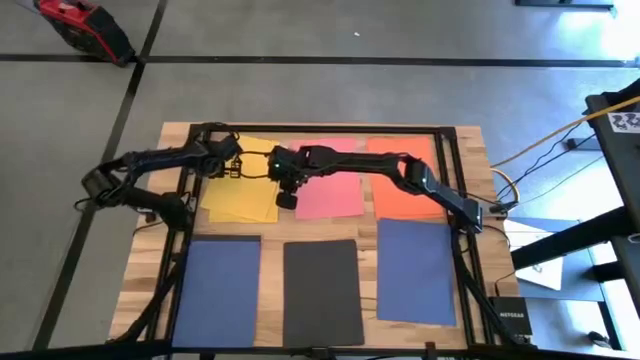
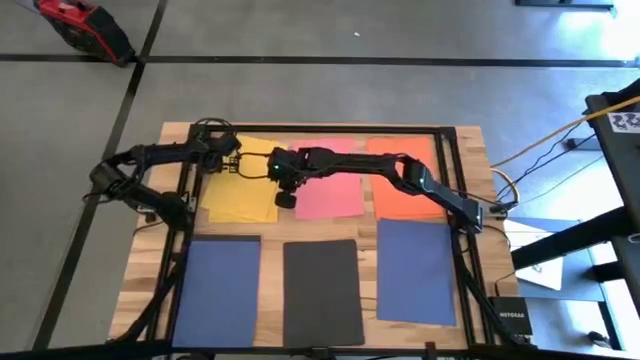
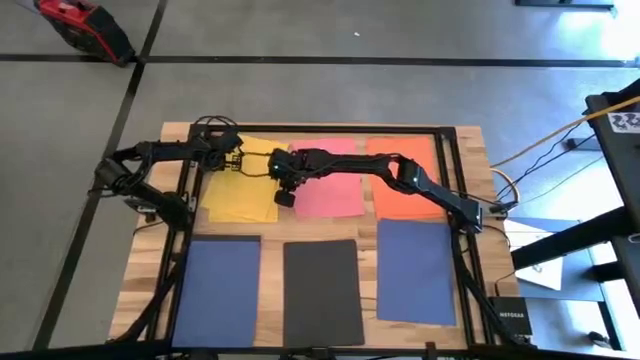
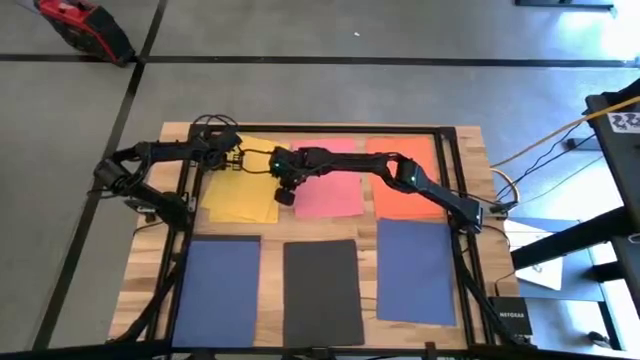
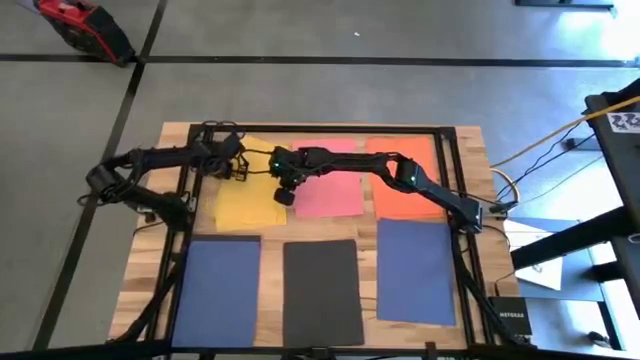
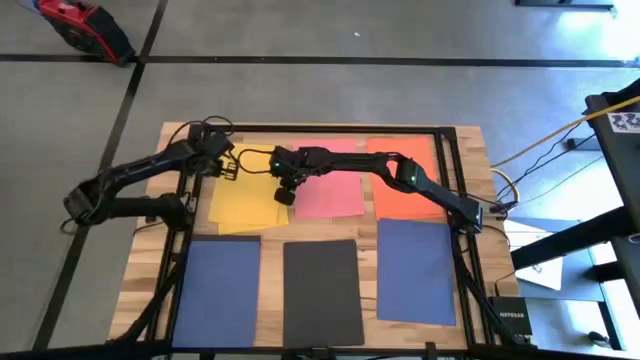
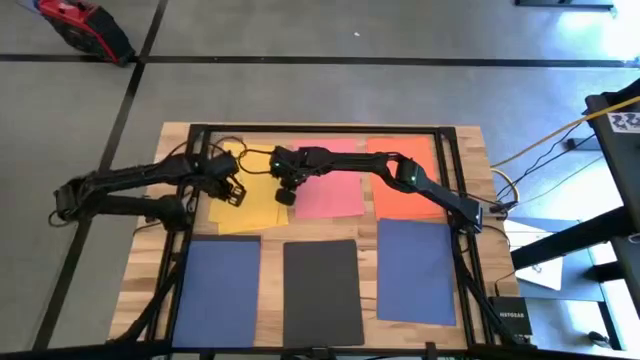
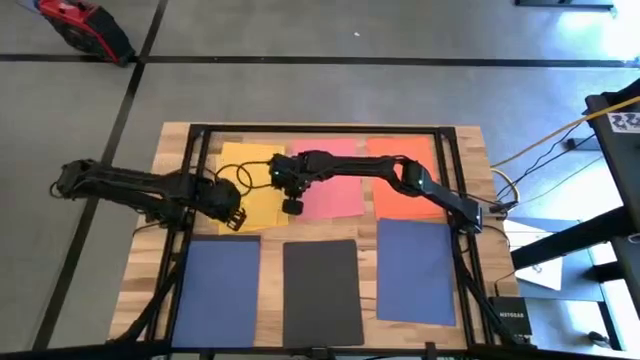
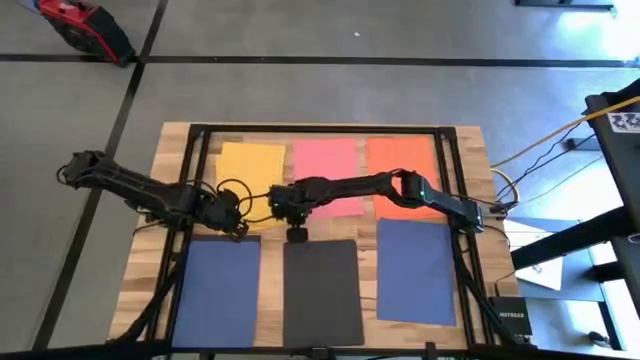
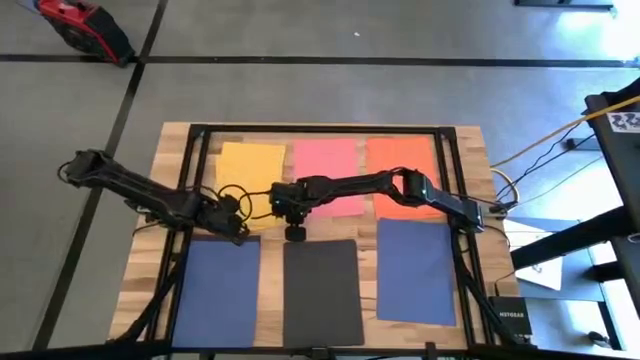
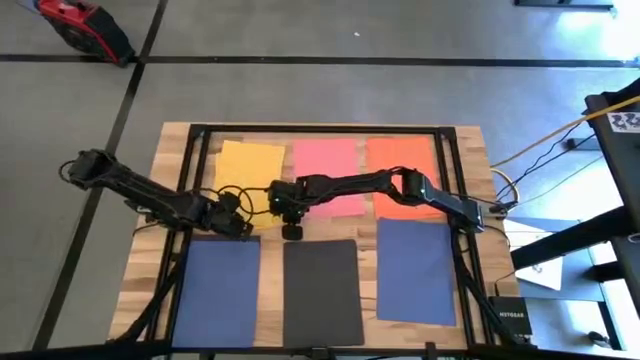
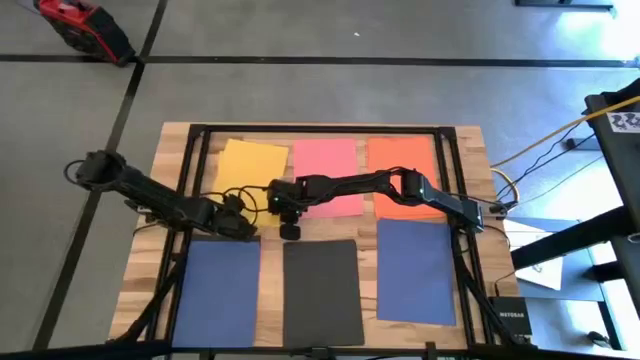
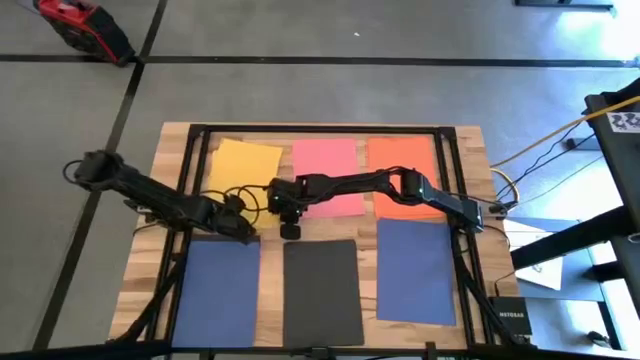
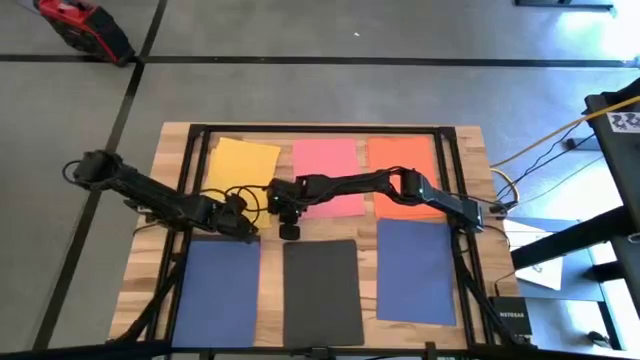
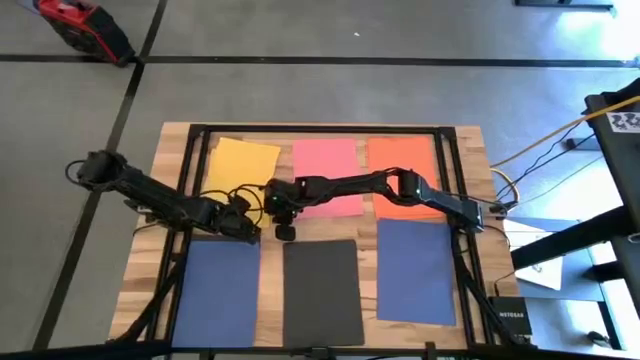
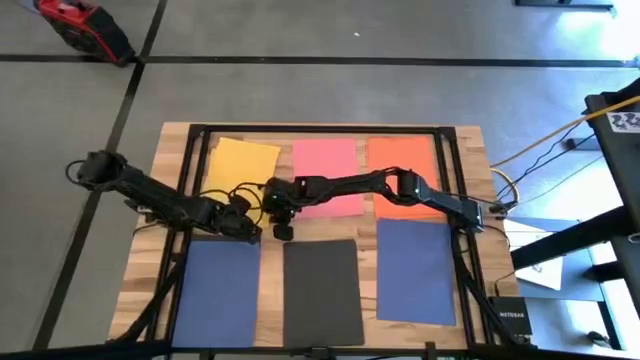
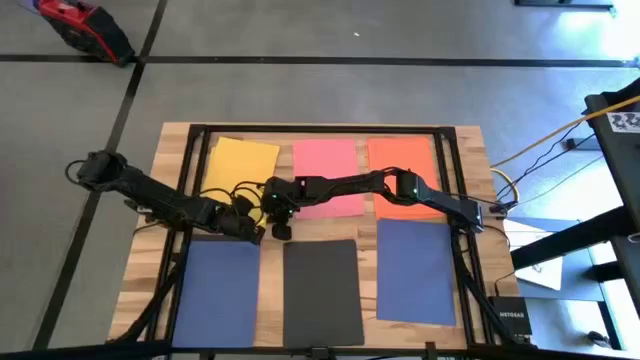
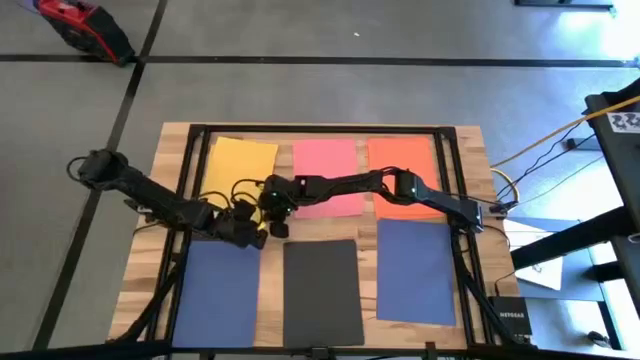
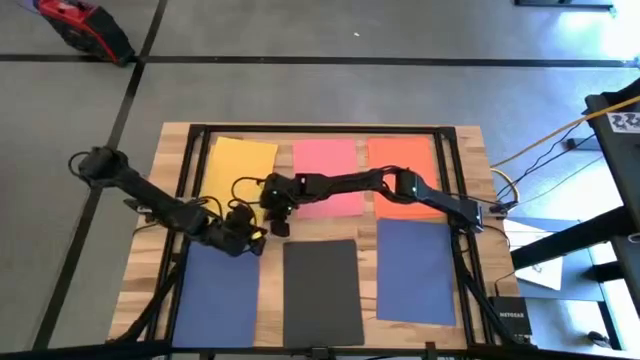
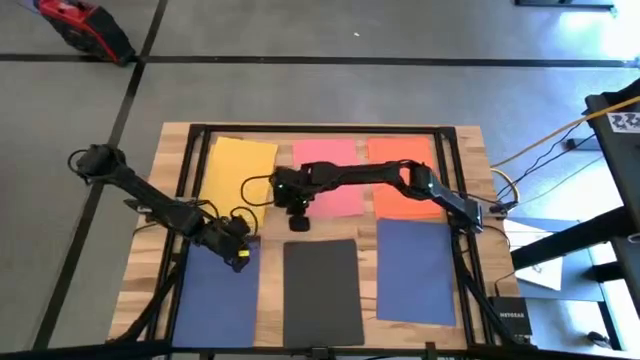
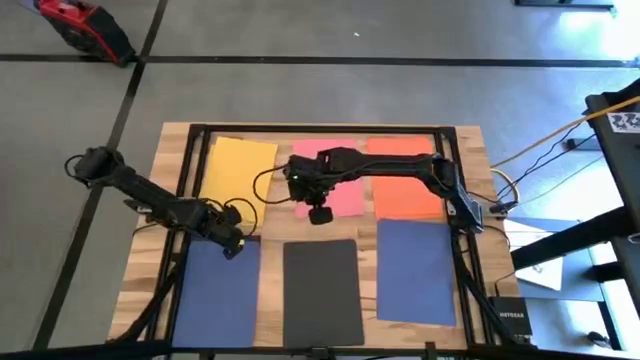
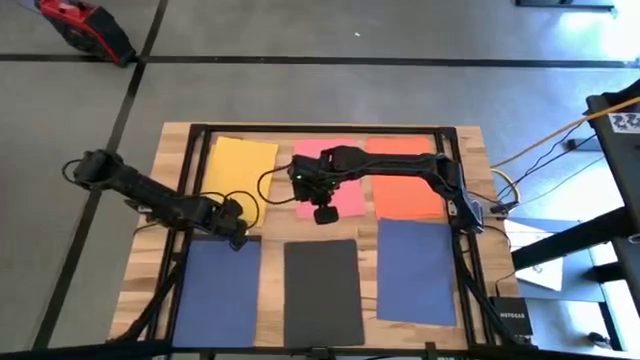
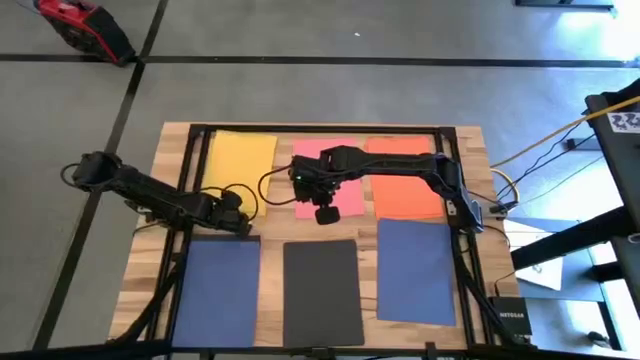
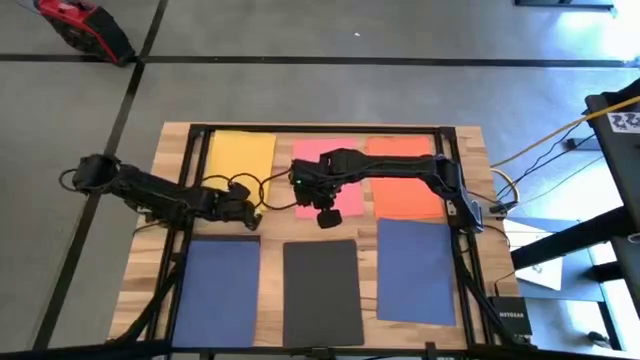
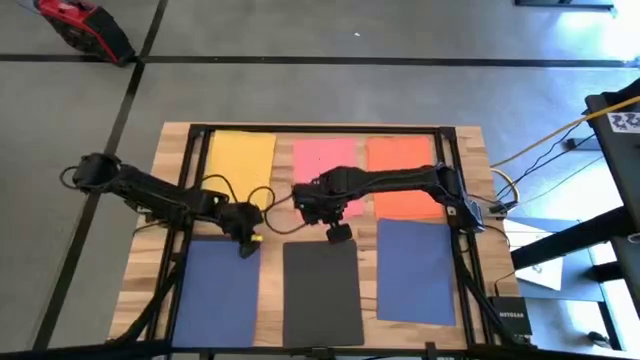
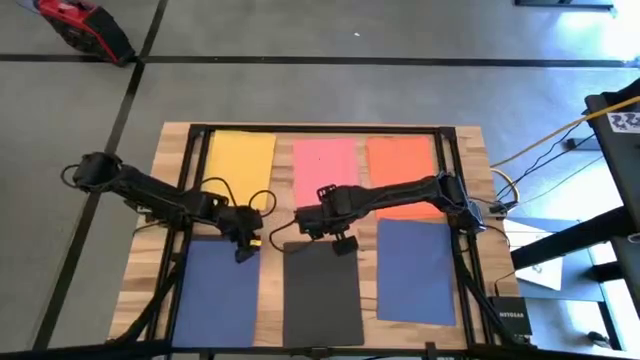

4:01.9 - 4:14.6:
Task: Organize paper
Stack the yellow paper on the top of the yellow paper

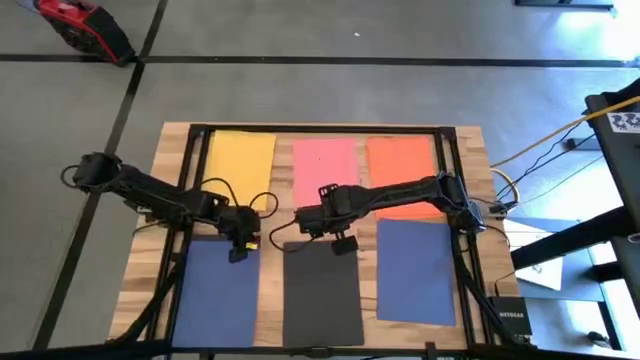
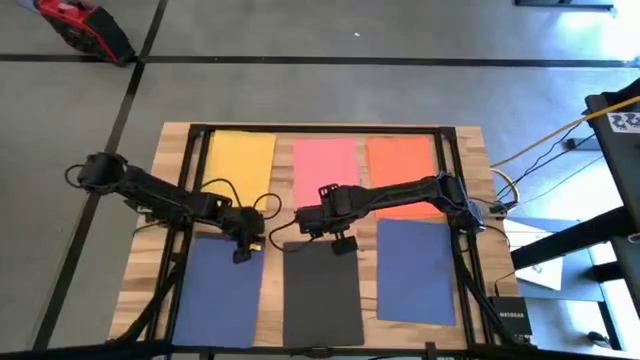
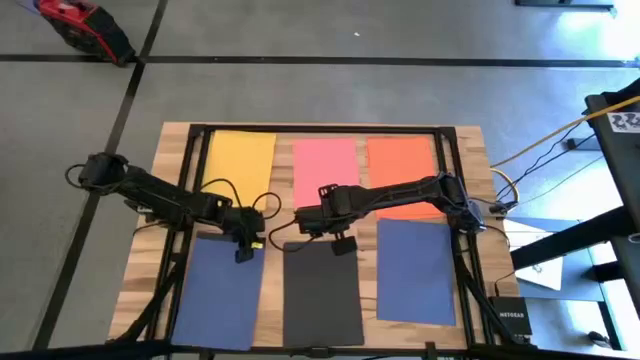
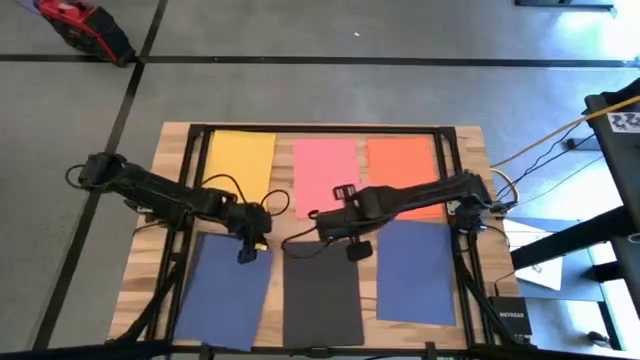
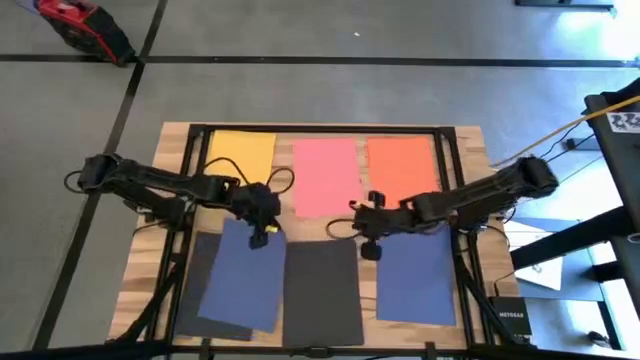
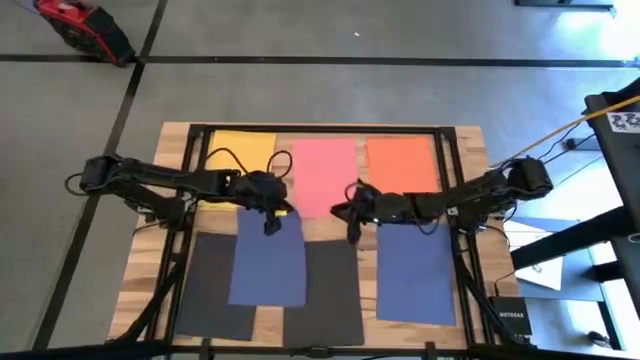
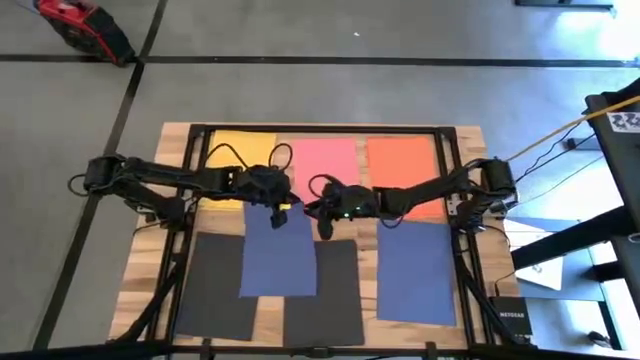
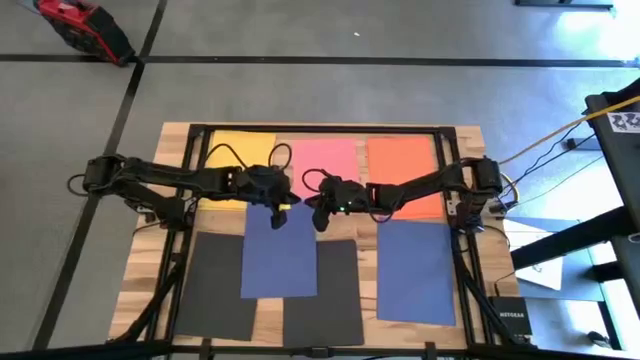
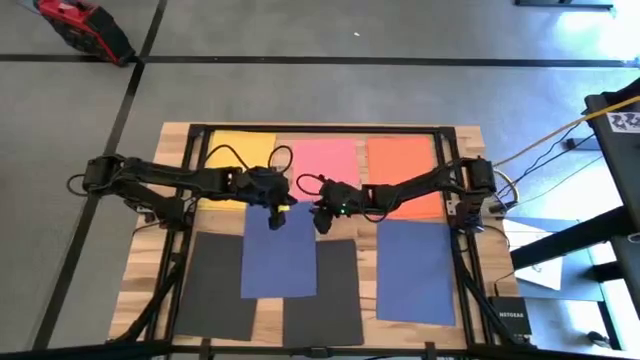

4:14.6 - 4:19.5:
Stack the blue paper on the top of the blue paper

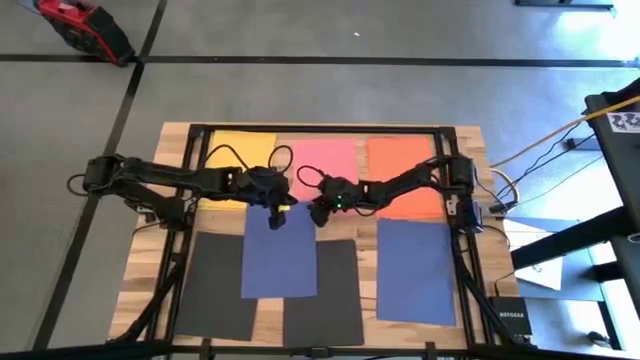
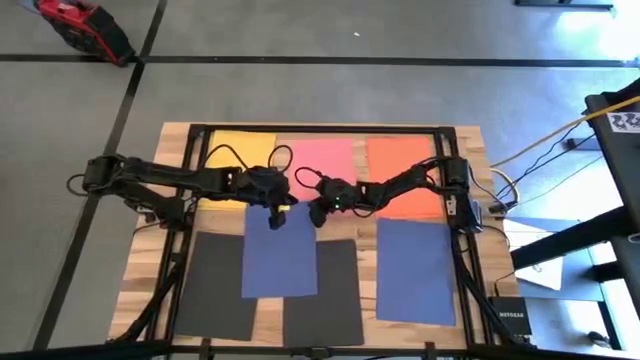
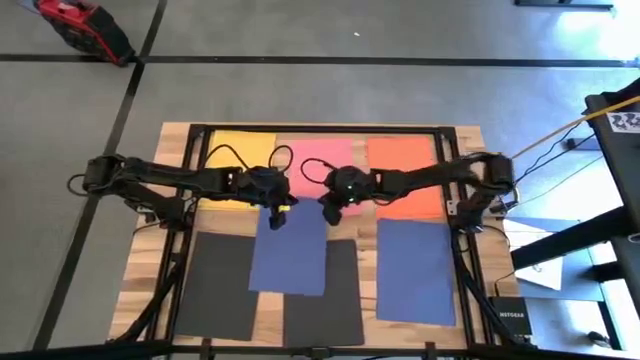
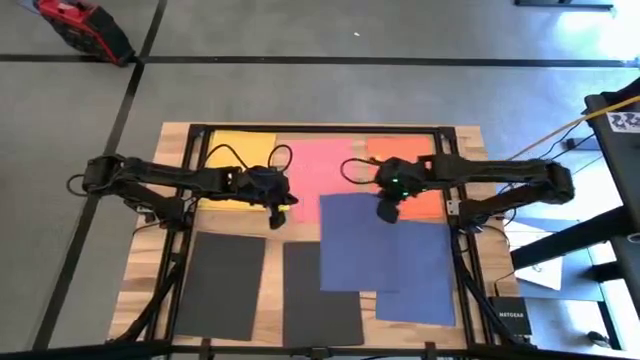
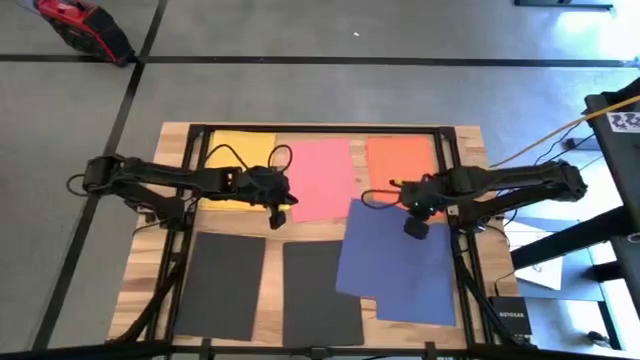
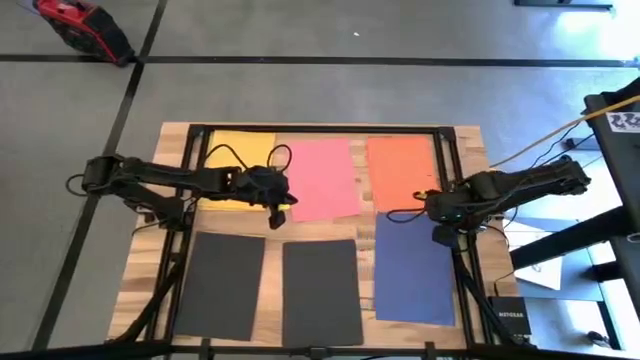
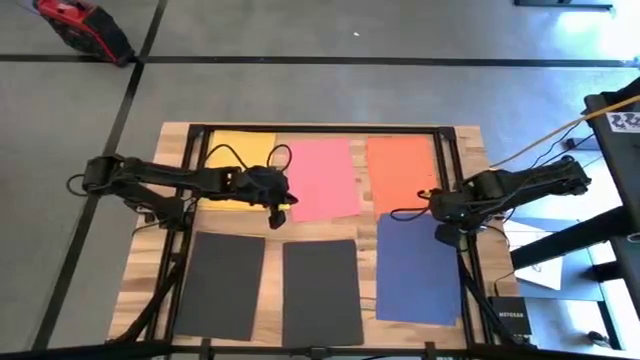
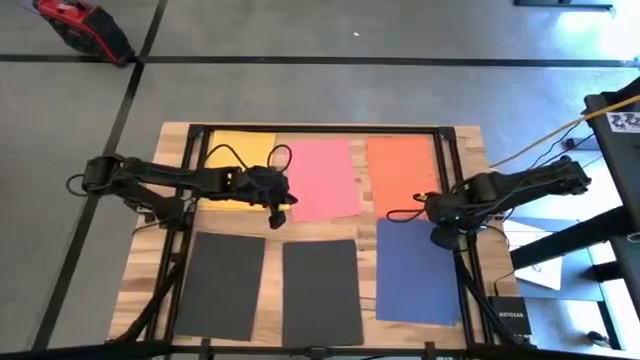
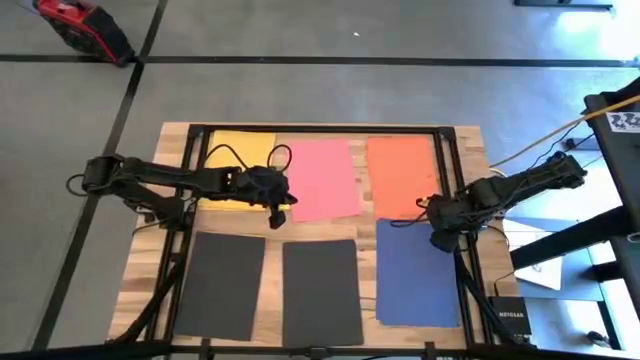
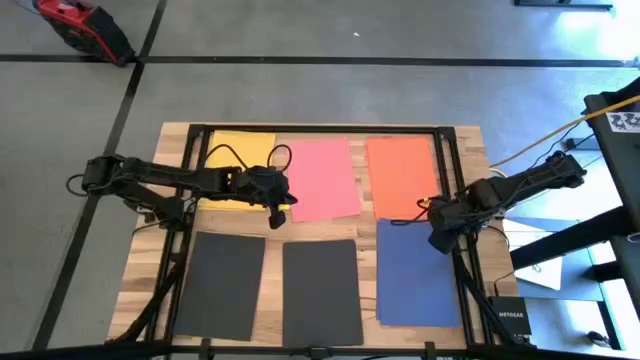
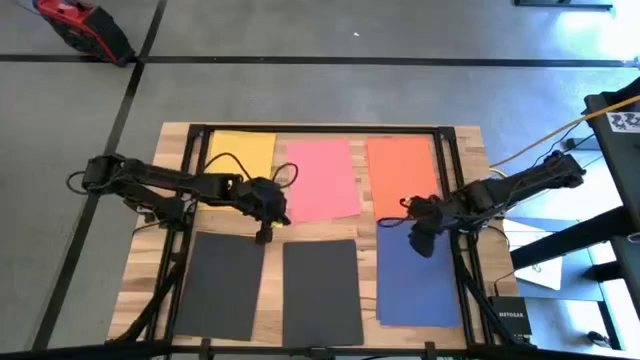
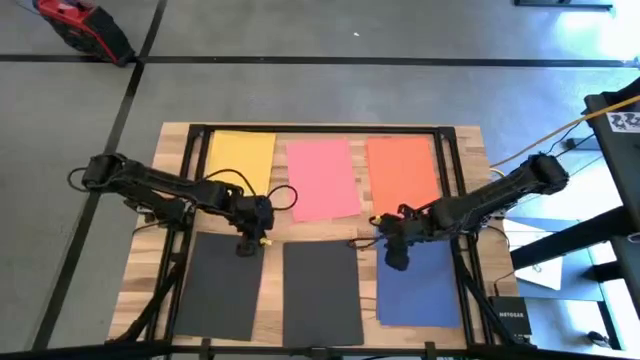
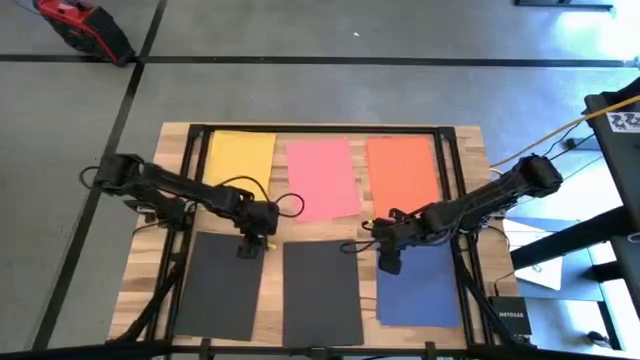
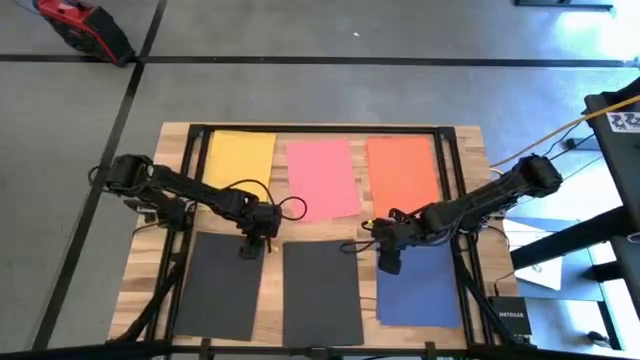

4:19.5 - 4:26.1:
Stack the blue paper on the top of the blue paper
